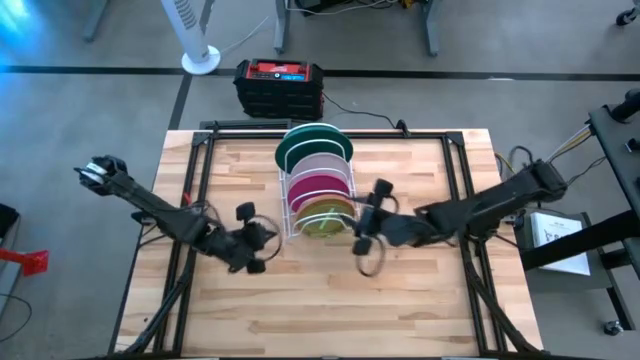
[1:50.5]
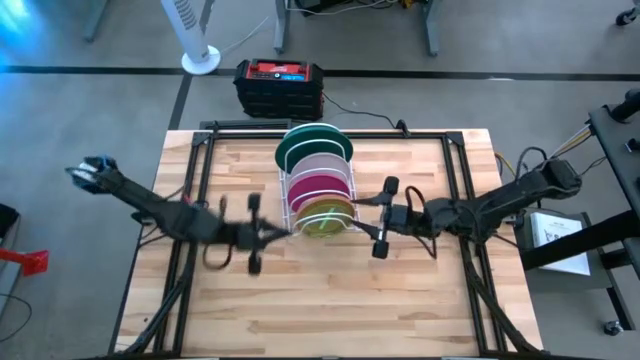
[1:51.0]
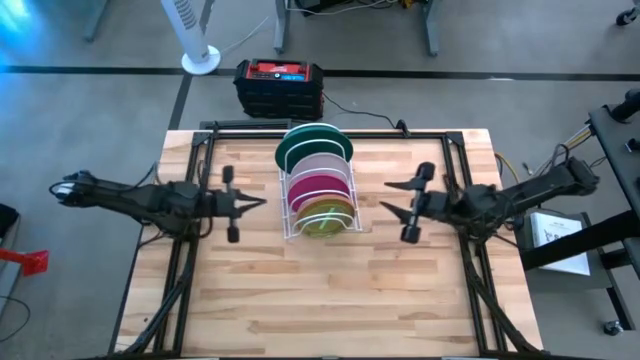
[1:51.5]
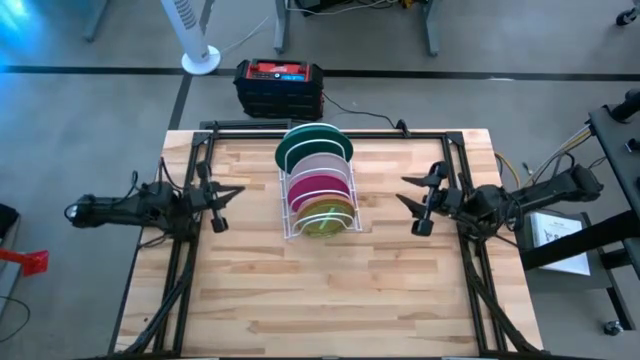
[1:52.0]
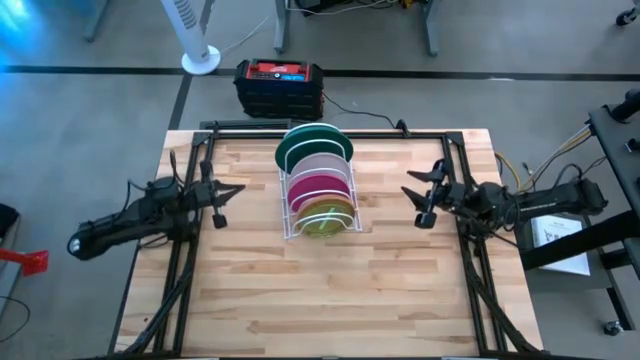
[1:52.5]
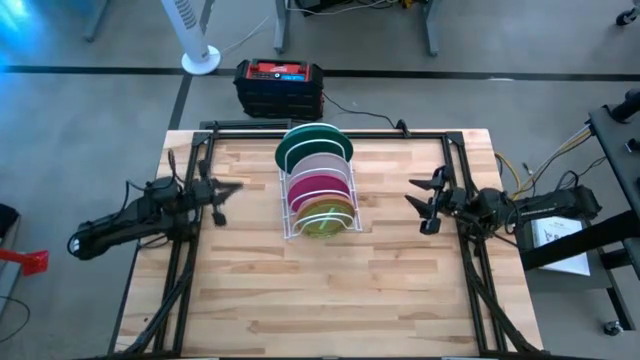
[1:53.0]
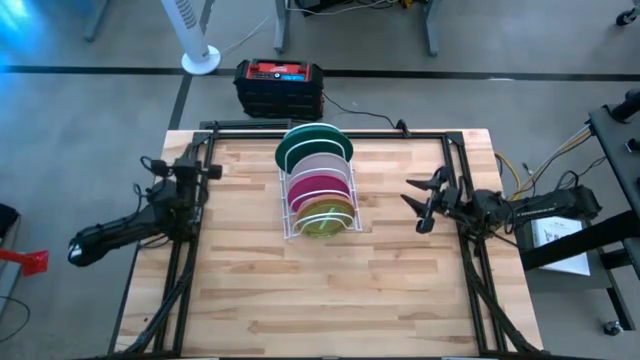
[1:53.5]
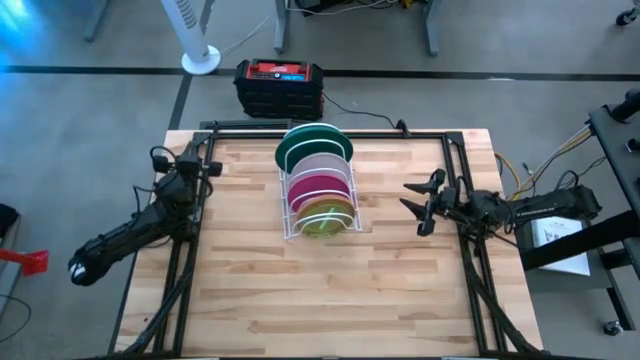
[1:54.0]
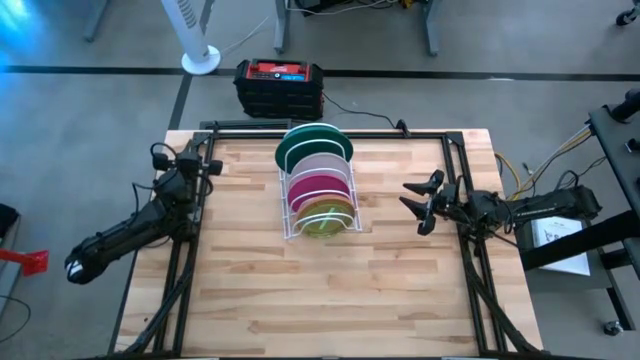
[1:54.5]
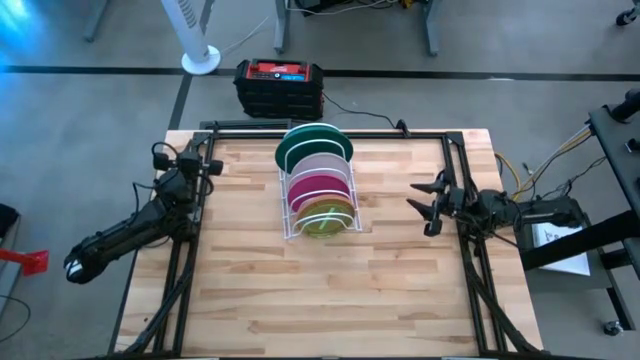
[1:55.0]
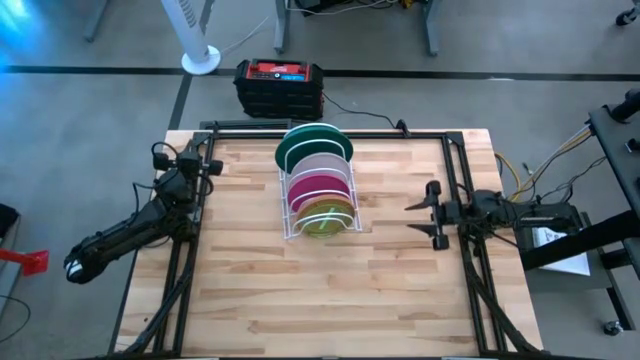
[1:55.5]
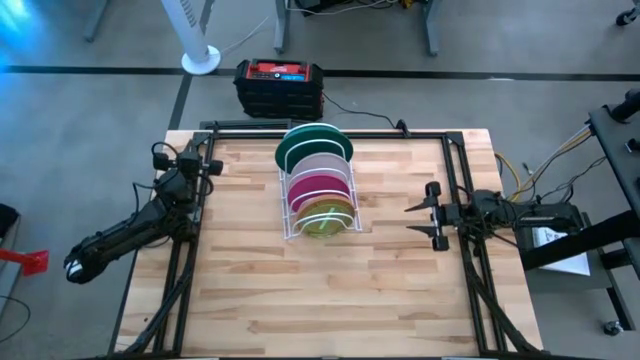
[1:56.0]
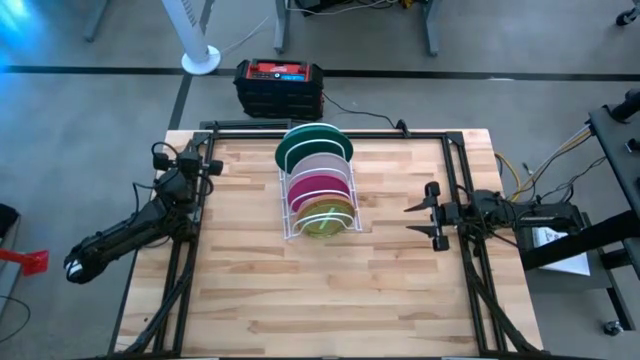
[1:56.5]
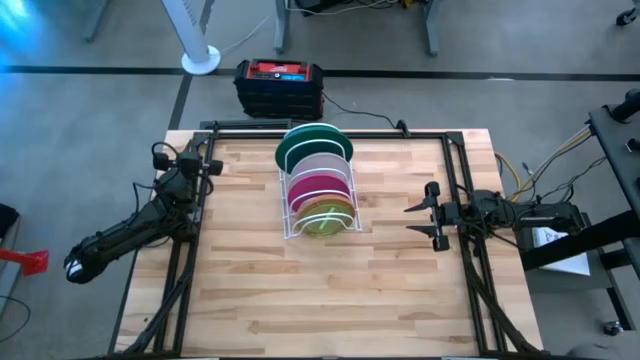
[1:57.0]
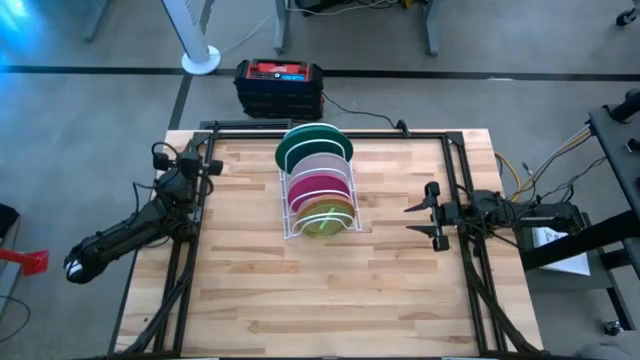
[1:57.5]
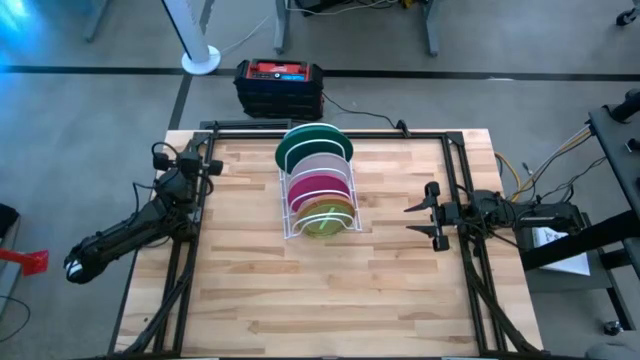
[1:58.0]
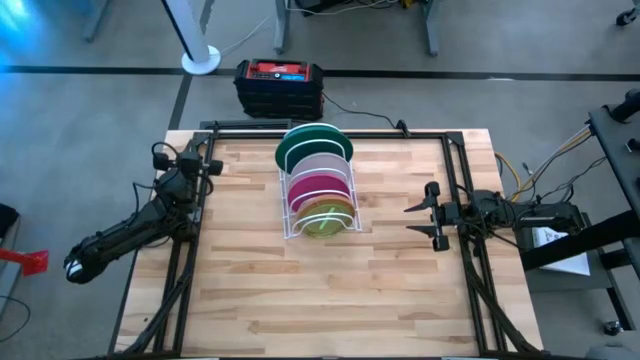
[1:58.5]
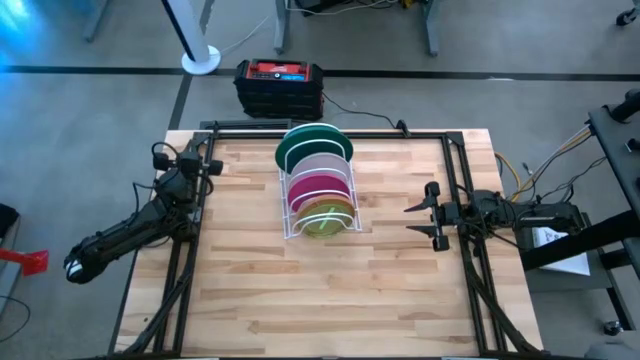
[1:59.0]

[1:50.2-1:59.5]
Task: Sort dishes
Return to Home Position
